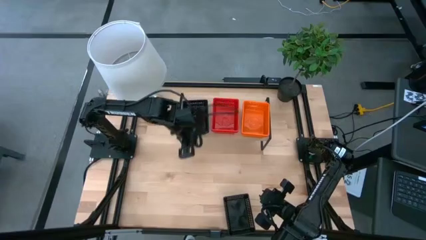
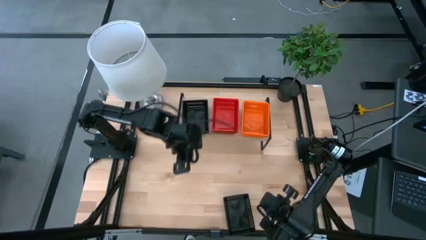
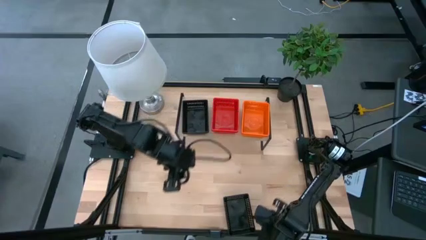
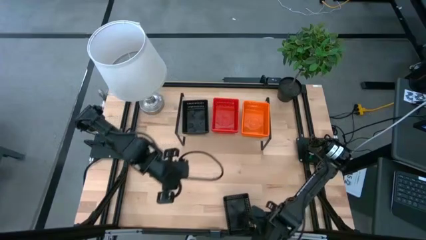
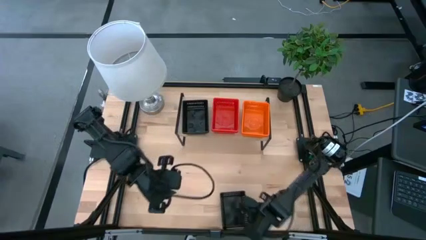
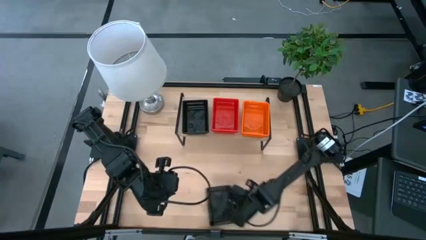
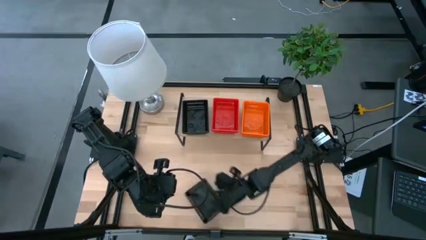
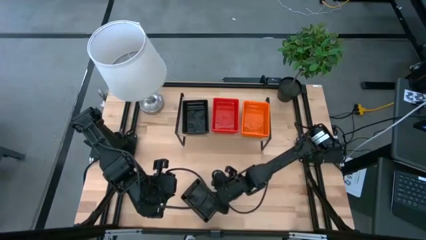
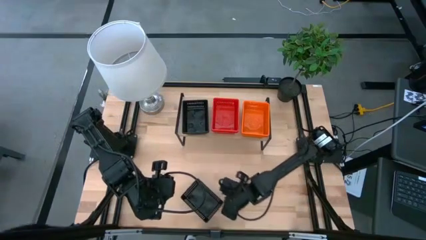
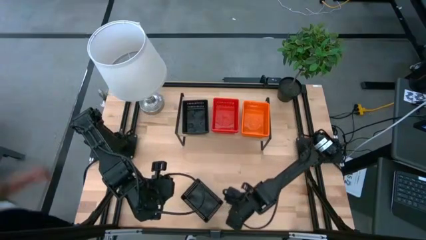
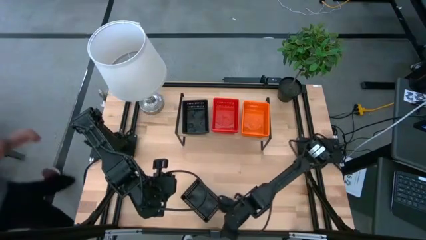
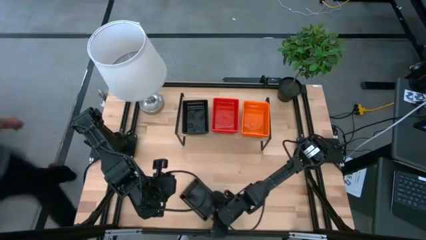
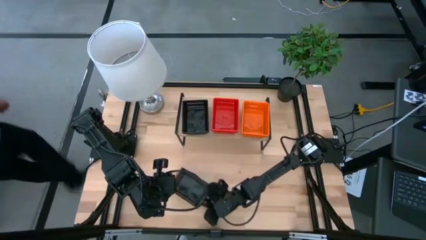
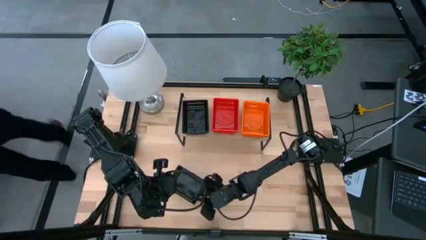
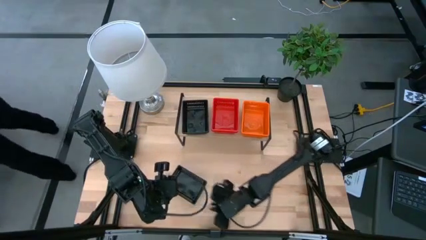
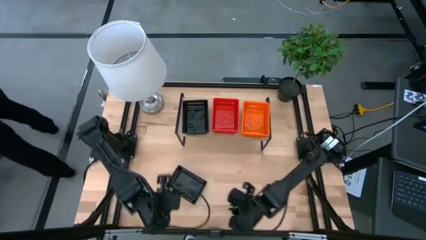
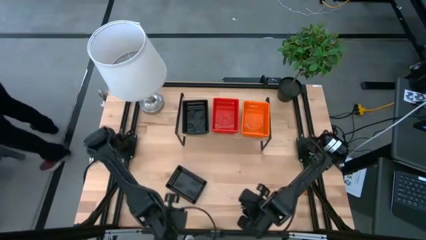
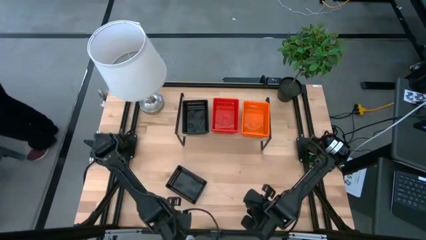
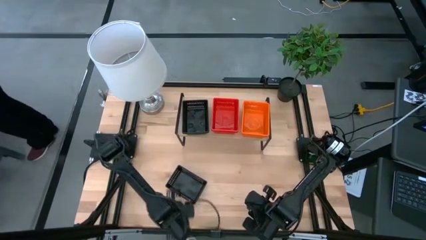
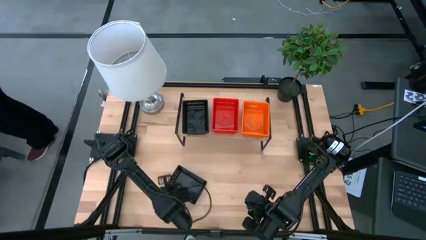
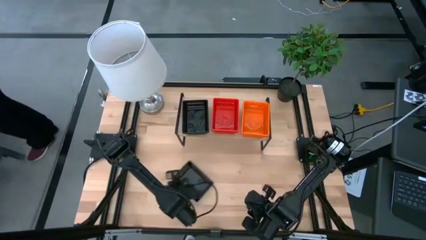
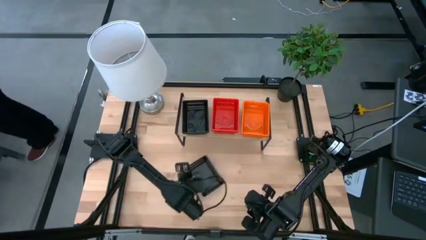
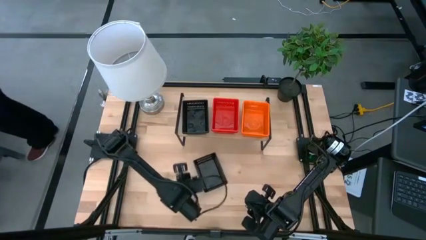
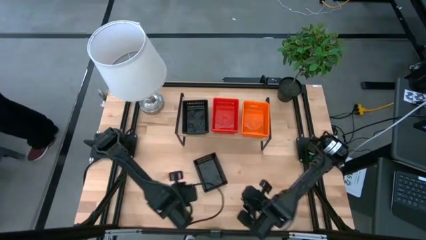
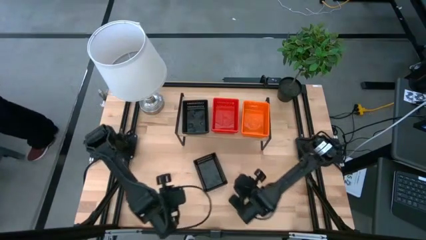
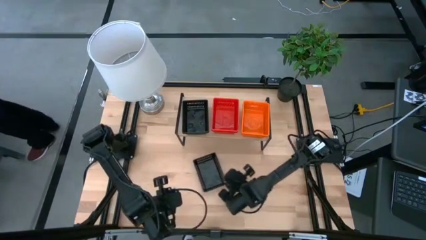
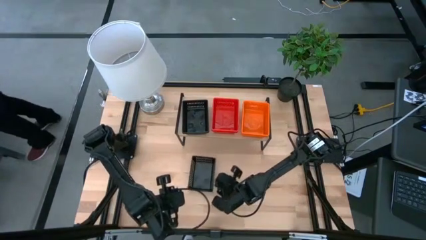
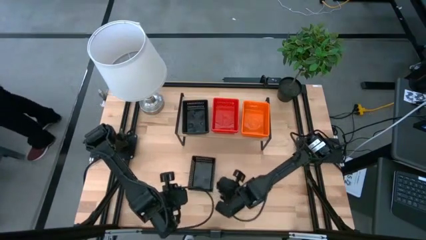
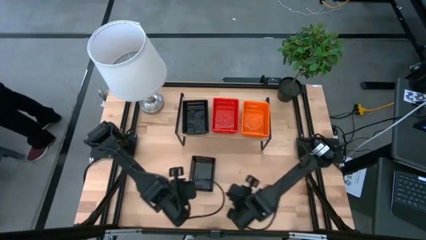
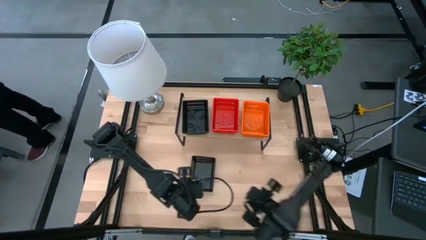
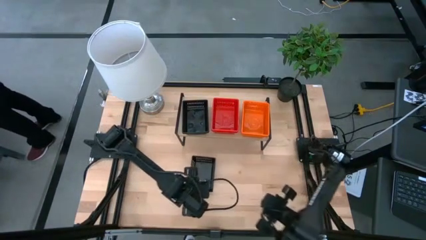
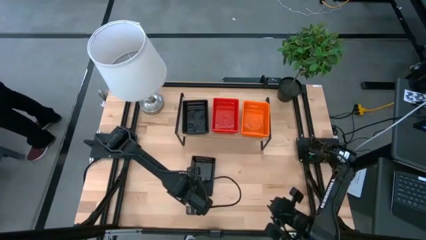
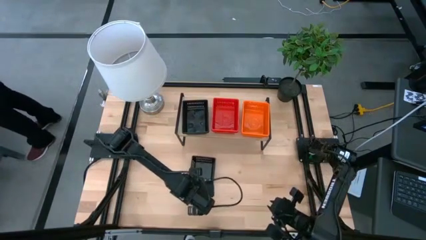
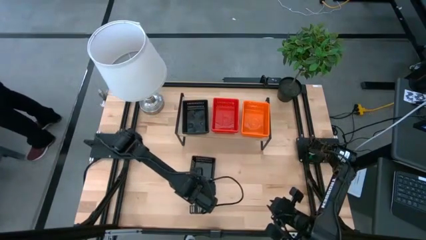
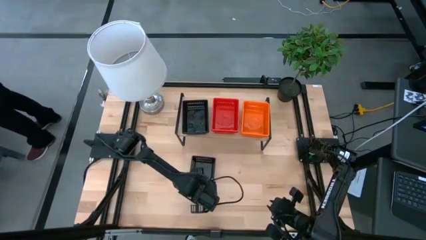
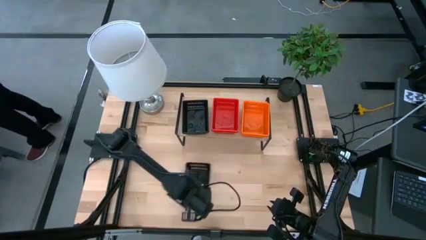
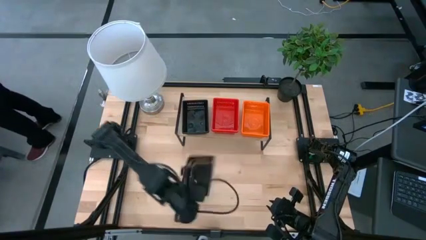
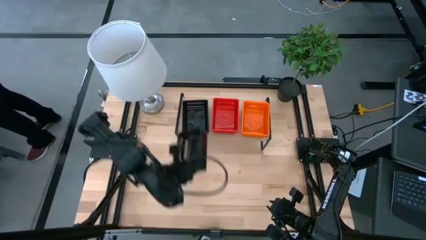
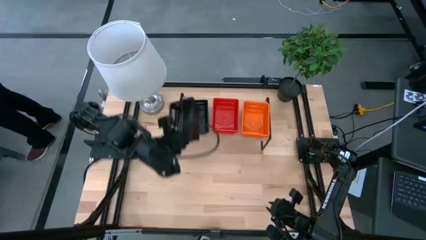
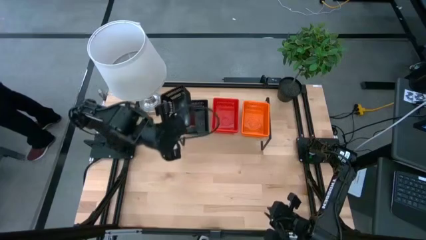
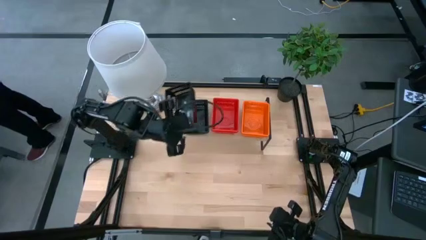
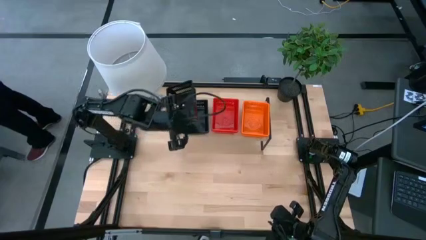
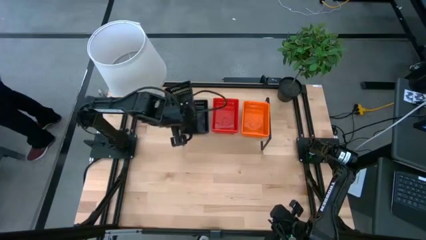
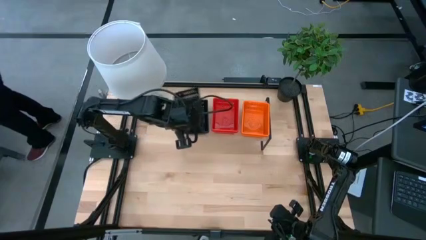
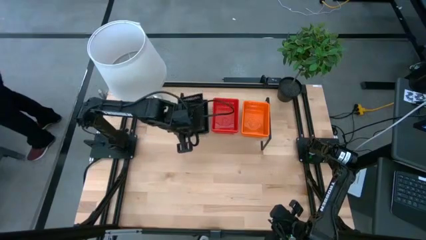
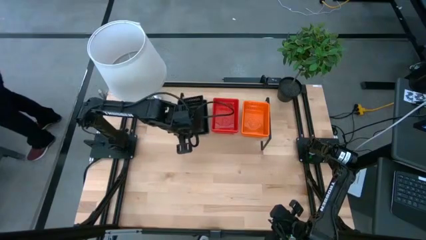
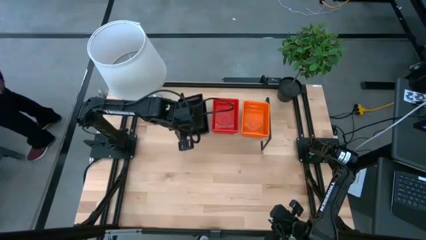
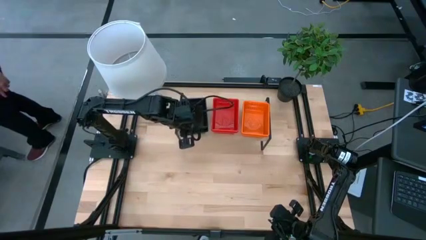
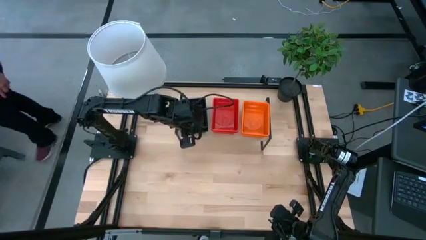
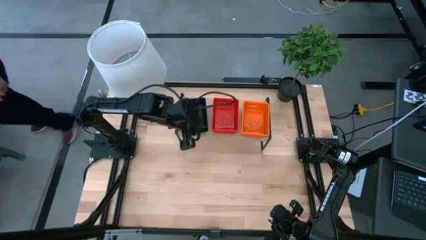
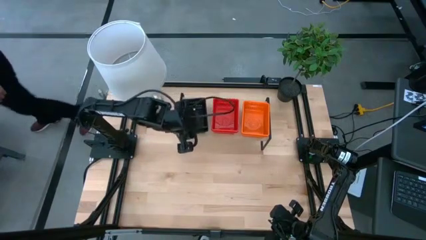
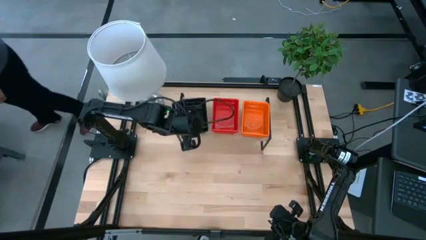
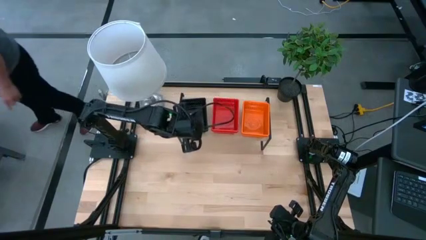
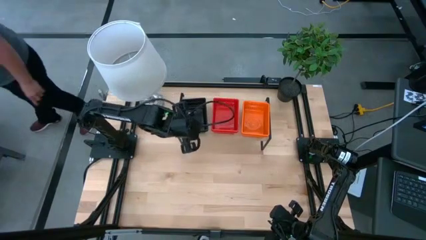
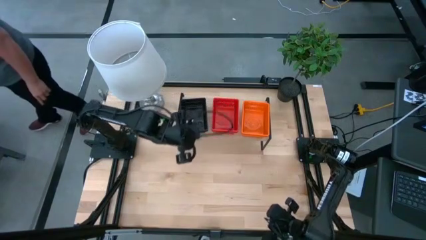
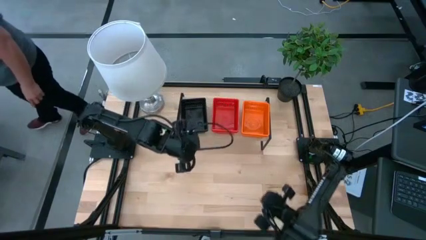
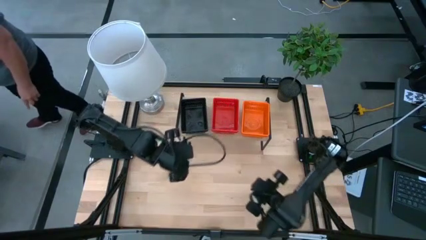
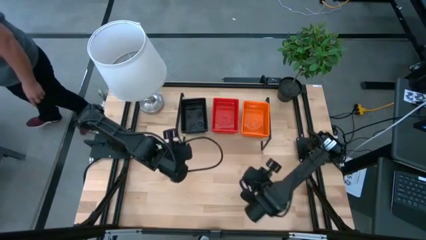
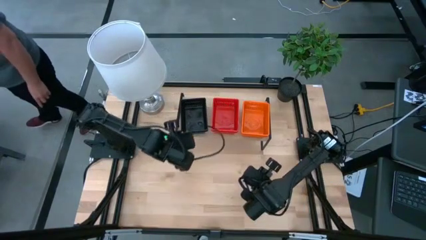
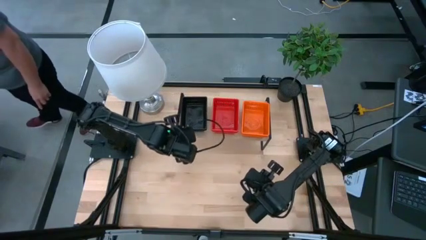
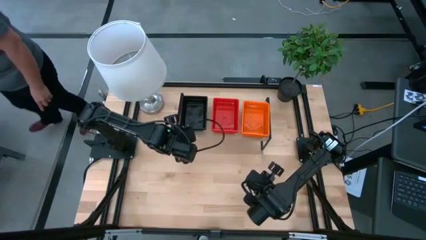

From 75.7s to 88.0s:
Task: Stack baskets on shelf by color
Stack the black bin on top of the black bin on the shelf

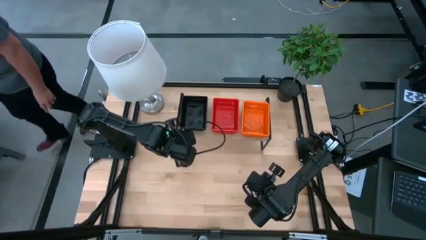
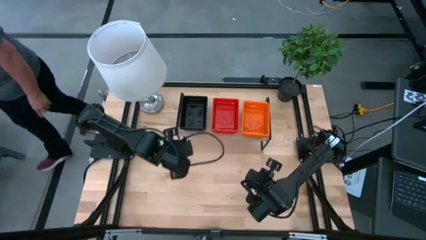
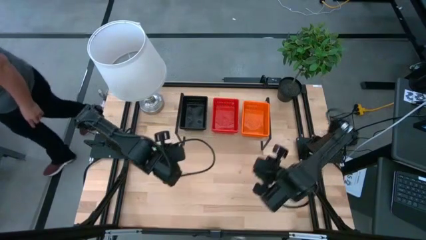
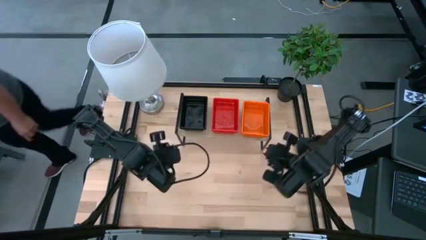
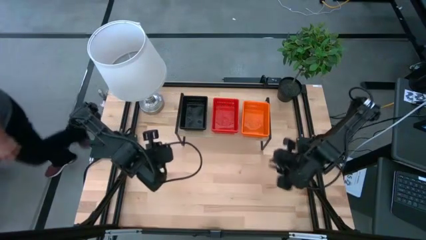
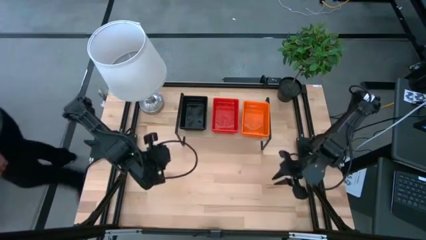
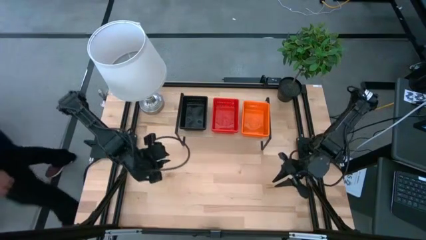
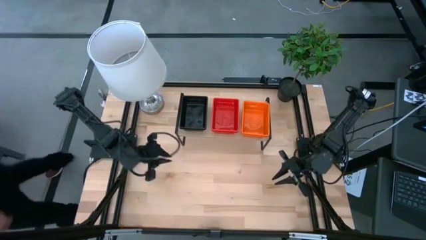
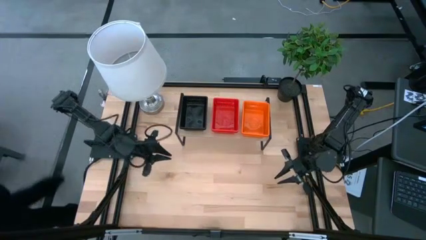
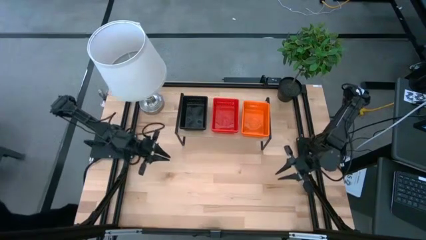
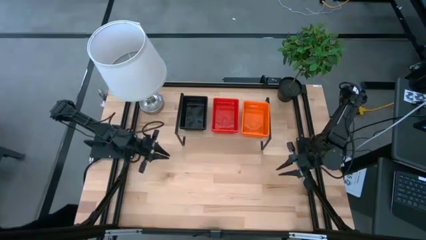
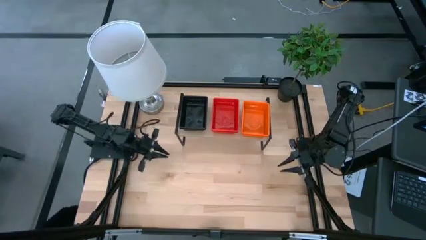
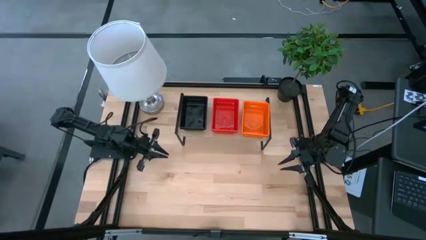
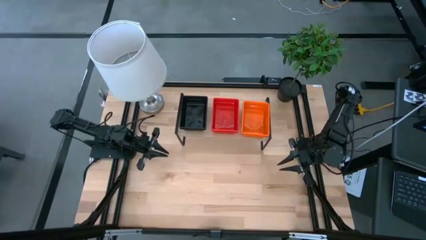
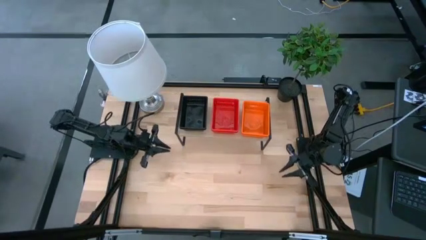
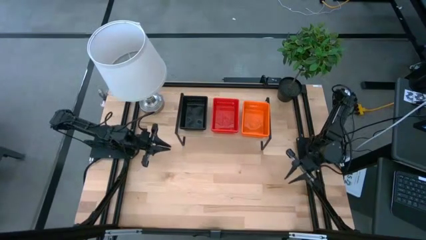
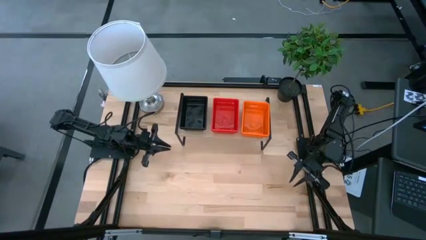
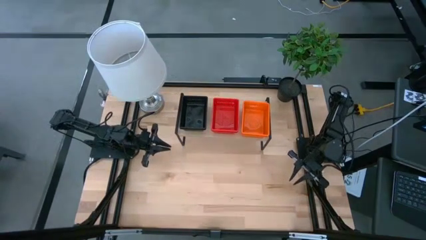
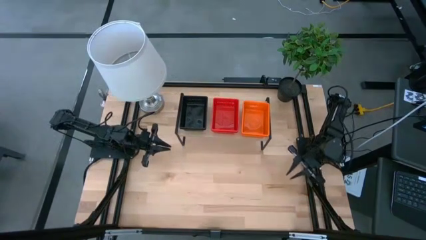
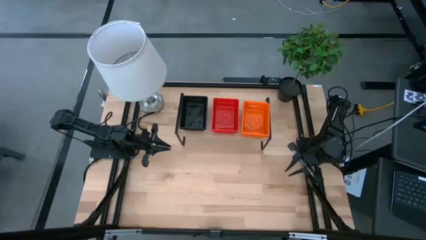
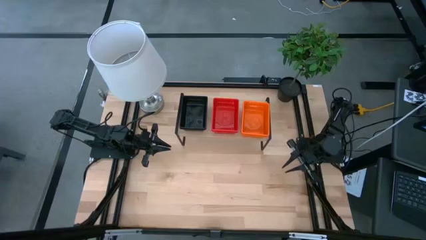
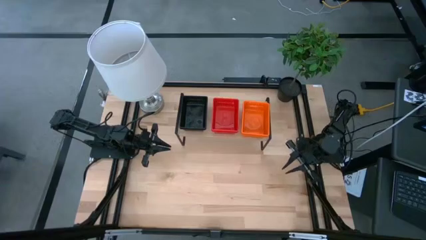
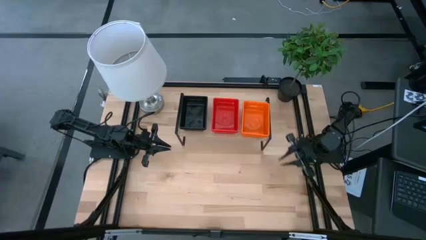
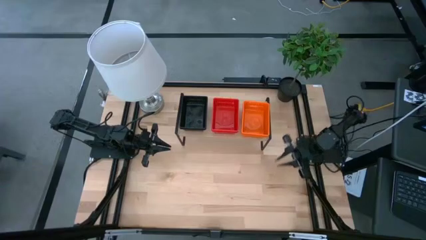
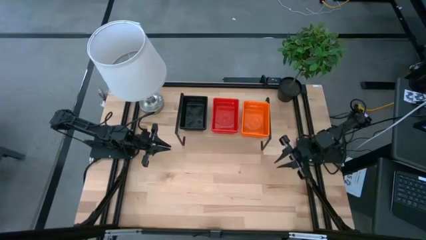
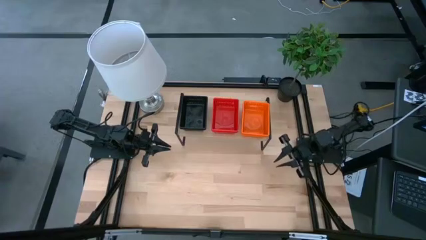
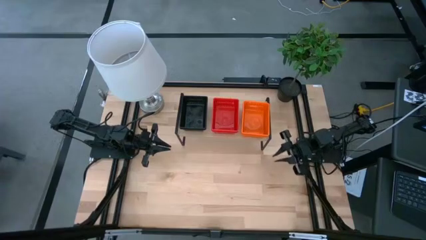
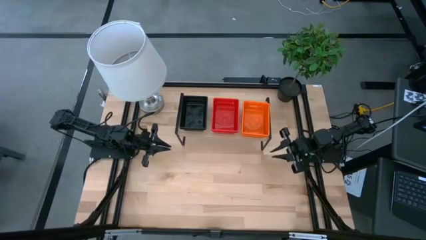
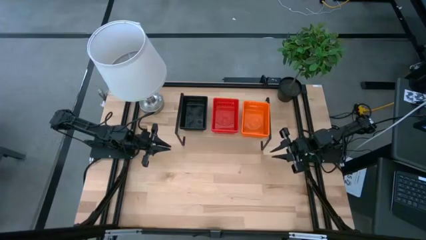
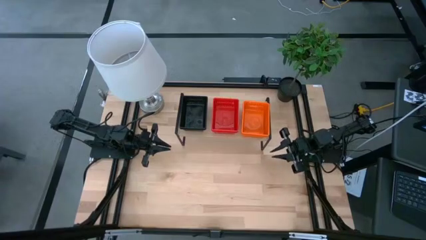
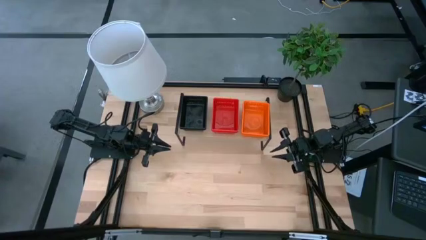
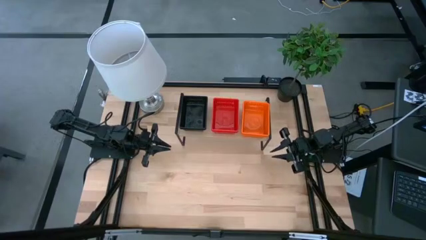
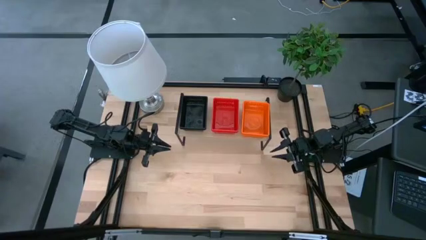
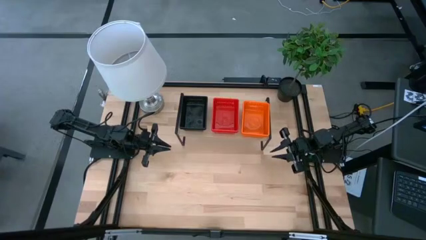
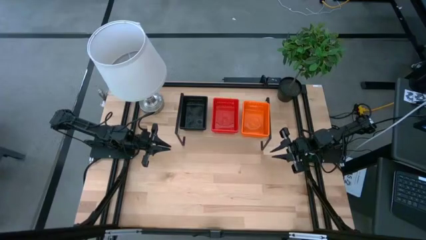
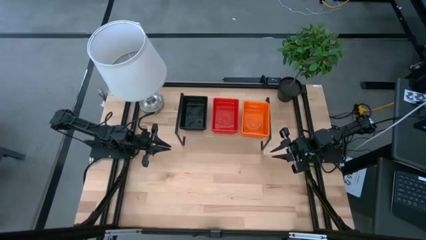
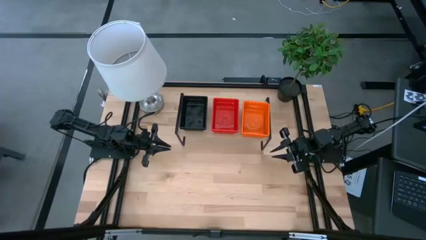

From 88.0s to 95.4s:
Return to Home Position
